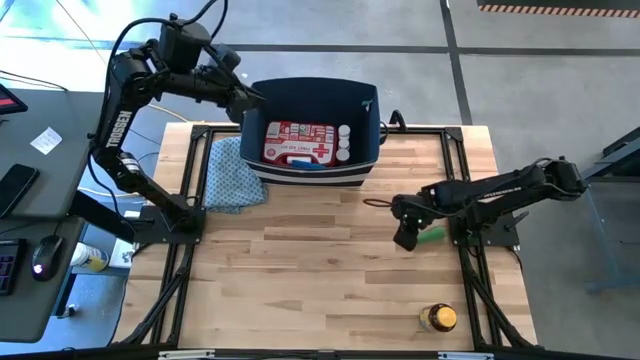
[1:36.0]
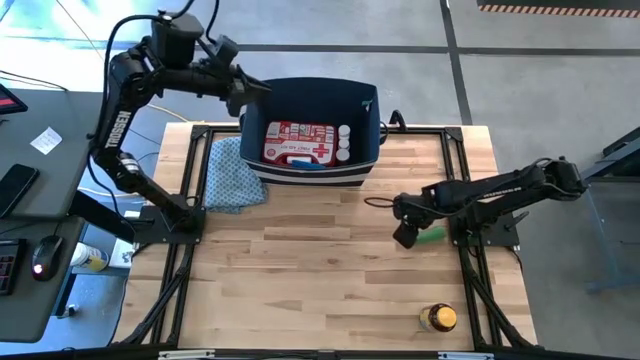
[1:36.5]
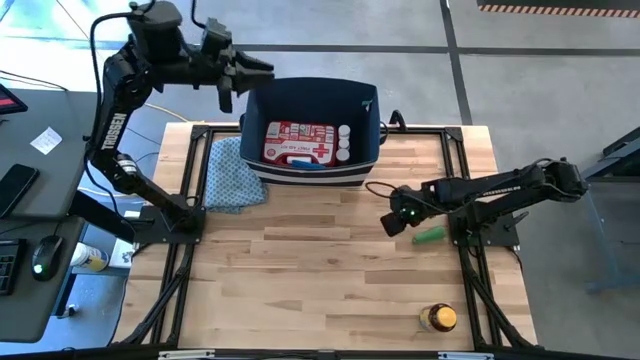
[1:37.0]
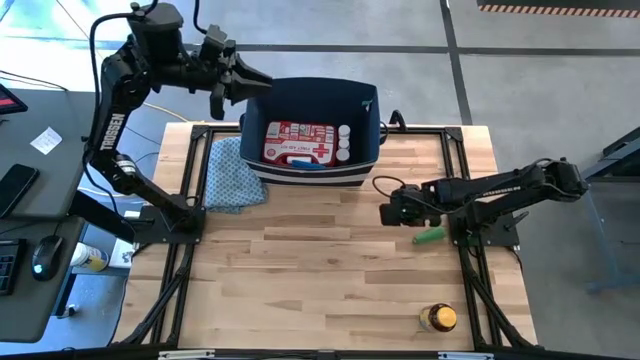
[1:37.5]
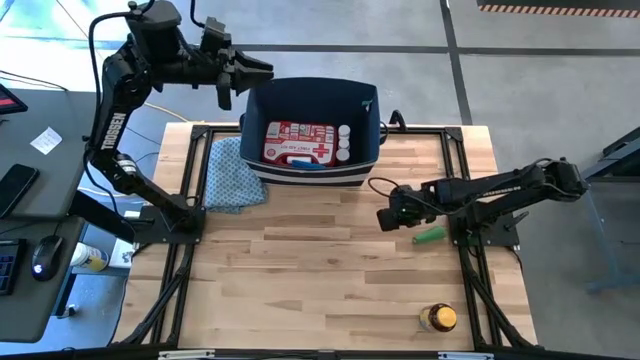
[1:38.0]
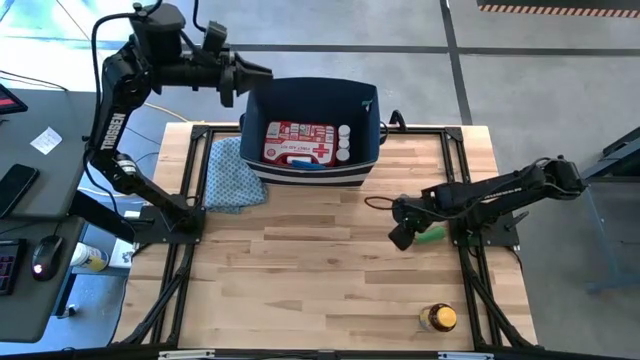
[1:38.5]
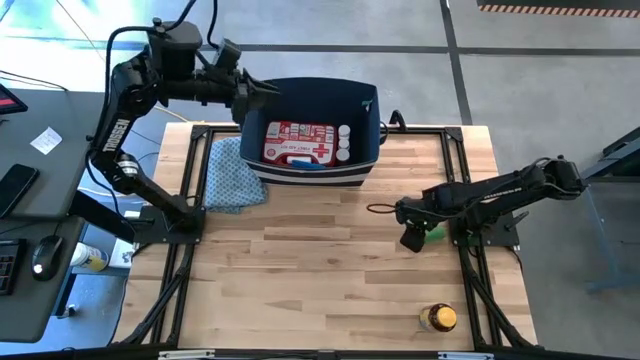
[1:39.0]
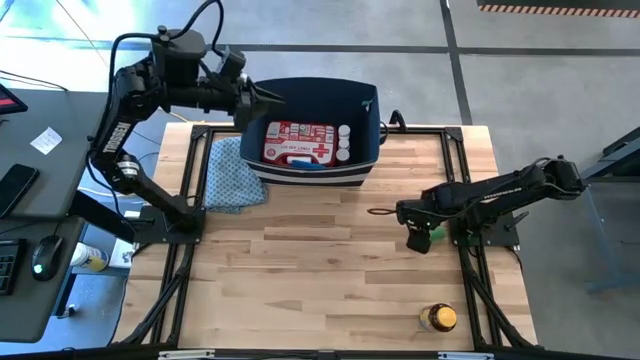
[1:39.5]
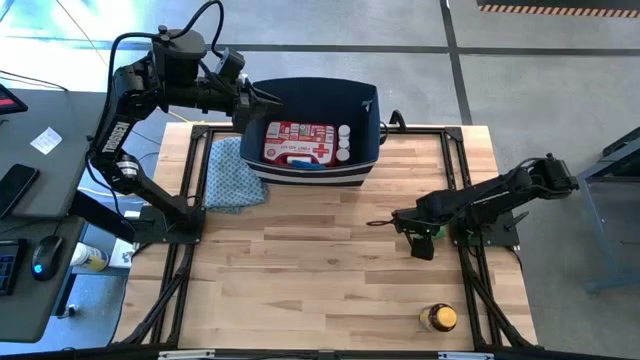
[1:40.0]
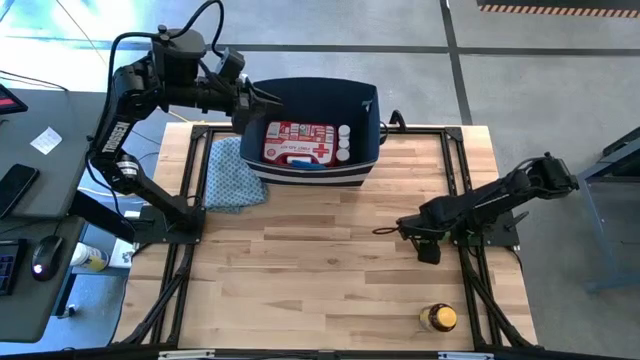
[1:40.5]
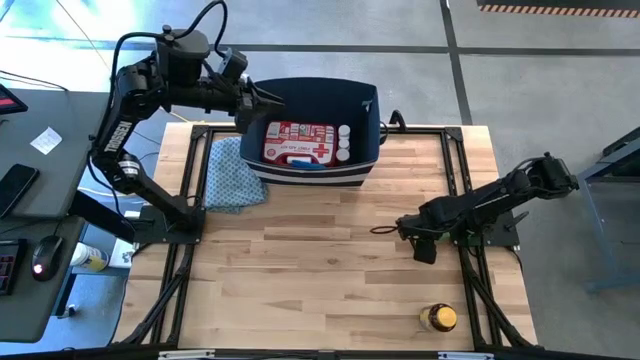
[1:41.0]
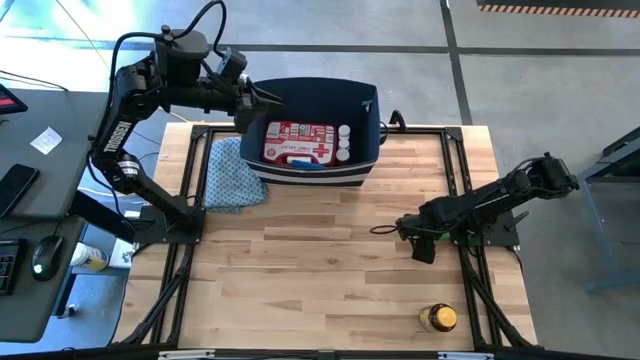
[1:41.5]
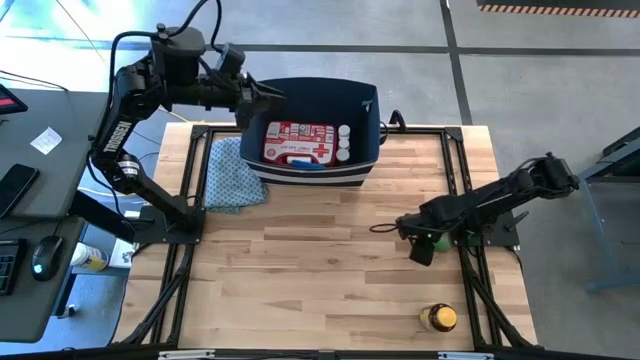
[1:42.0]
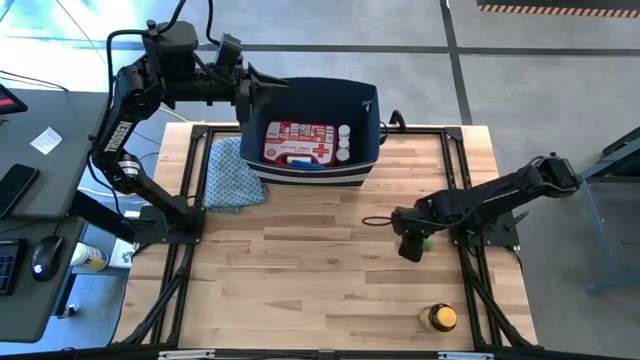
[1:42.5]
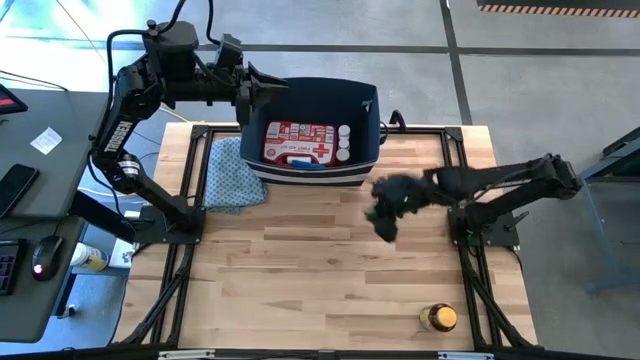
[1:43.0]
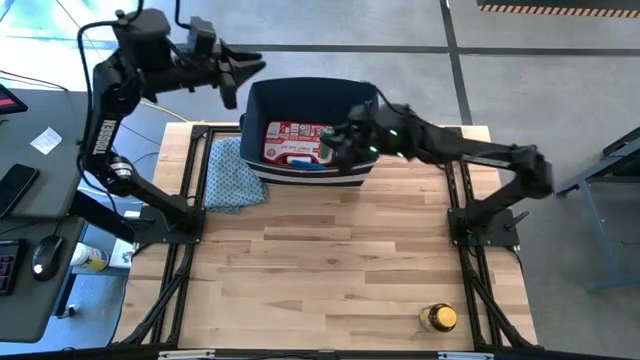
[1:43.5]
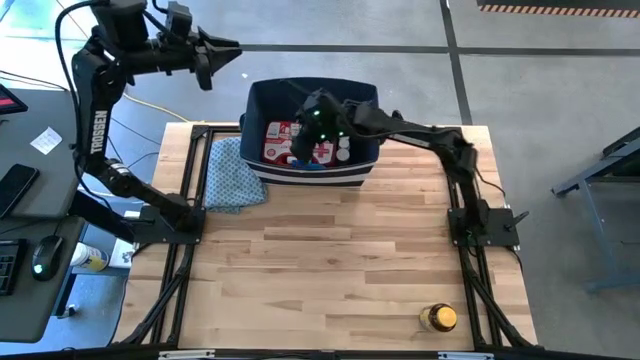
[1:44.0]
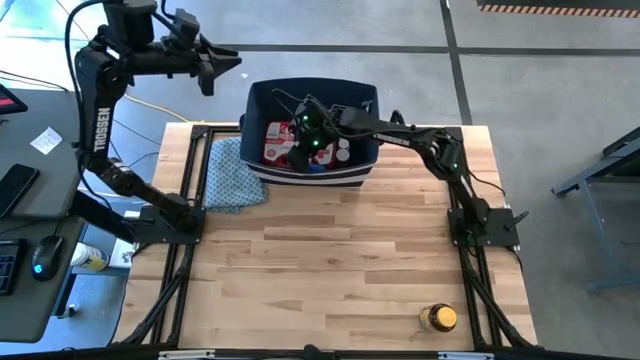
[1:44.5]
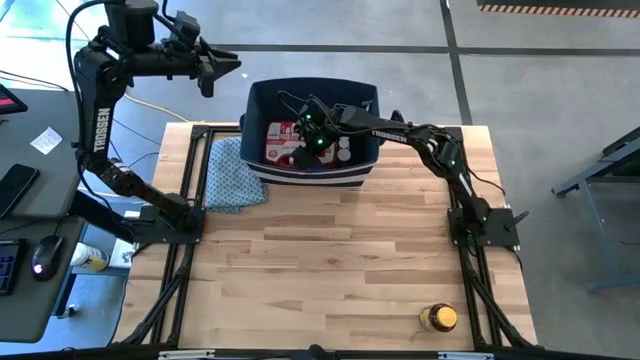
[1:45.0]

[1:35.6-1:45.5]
Task: Pick & place medical supplies in basket/bin
Put the green bandage into the blue bin

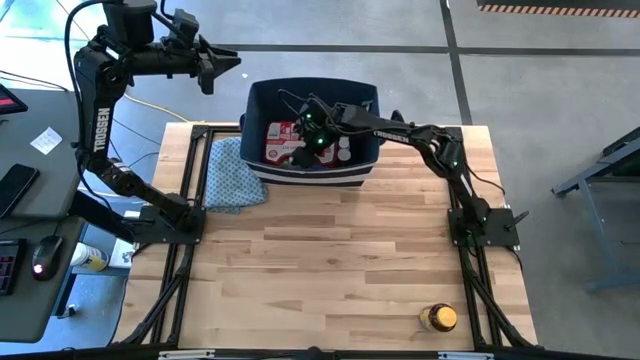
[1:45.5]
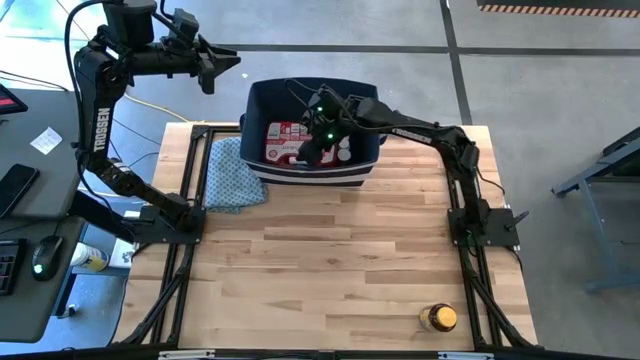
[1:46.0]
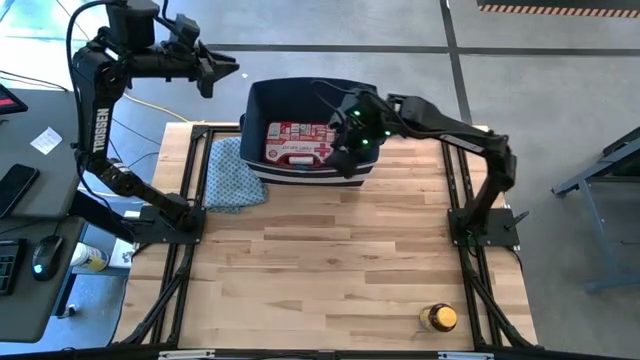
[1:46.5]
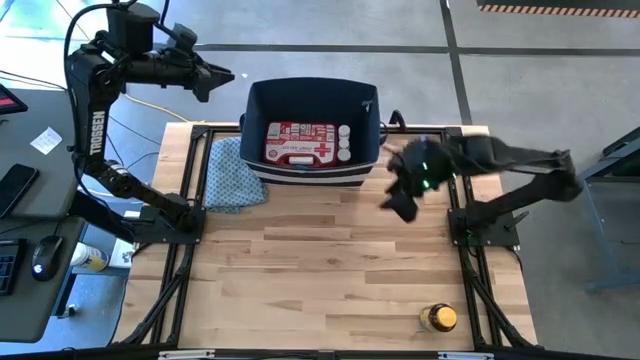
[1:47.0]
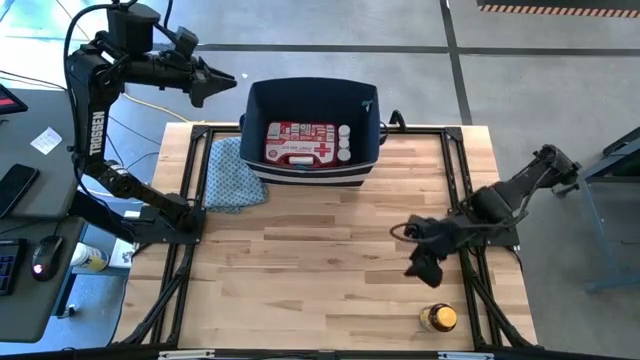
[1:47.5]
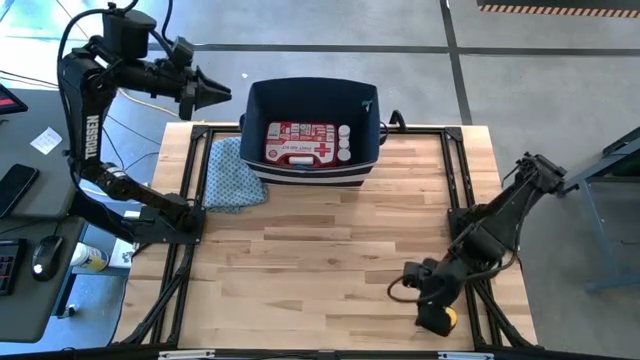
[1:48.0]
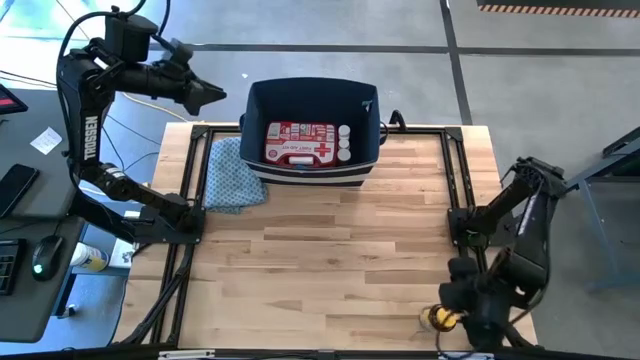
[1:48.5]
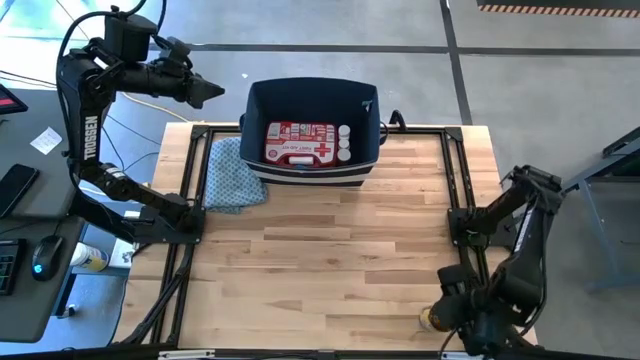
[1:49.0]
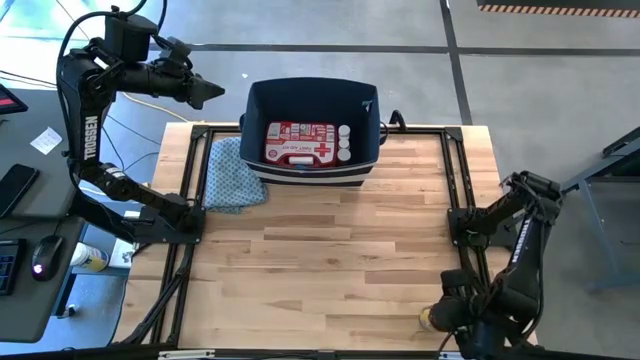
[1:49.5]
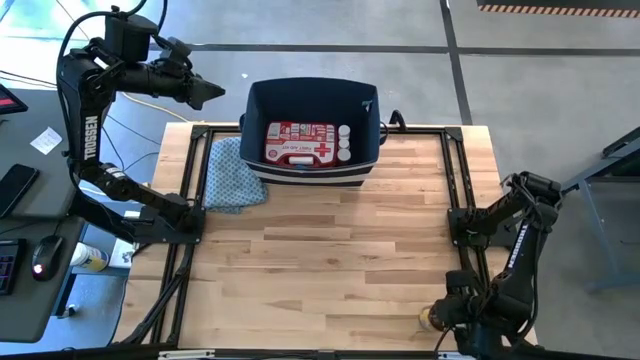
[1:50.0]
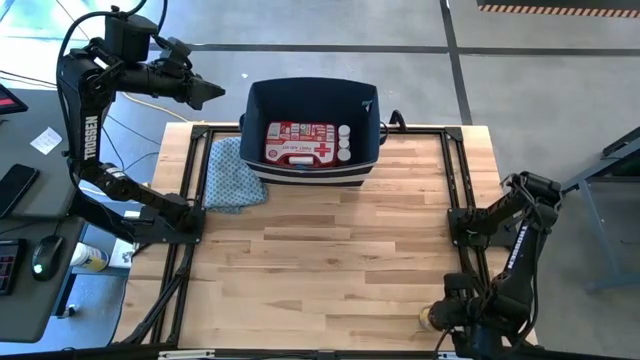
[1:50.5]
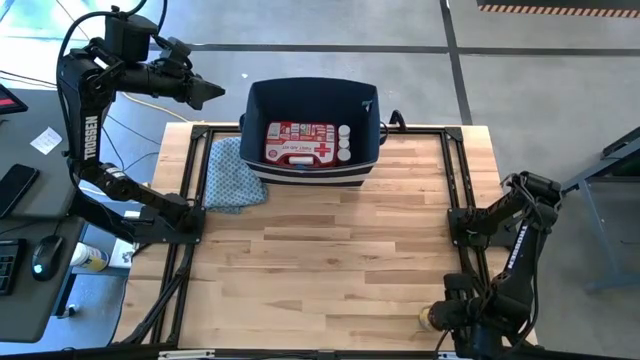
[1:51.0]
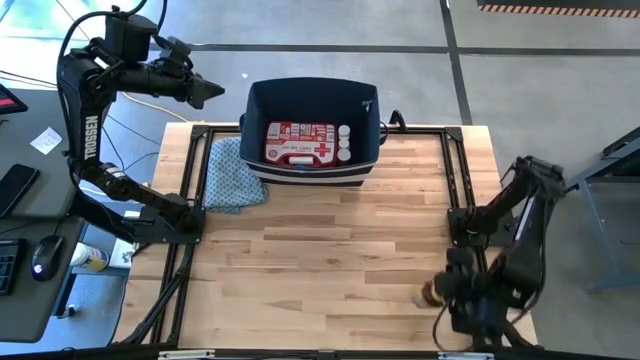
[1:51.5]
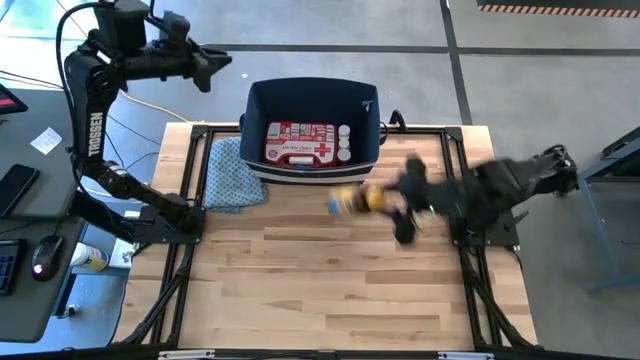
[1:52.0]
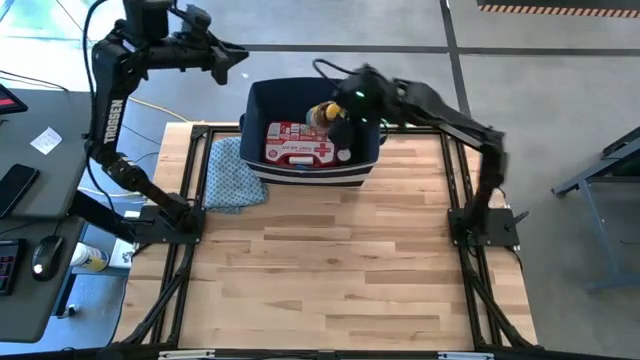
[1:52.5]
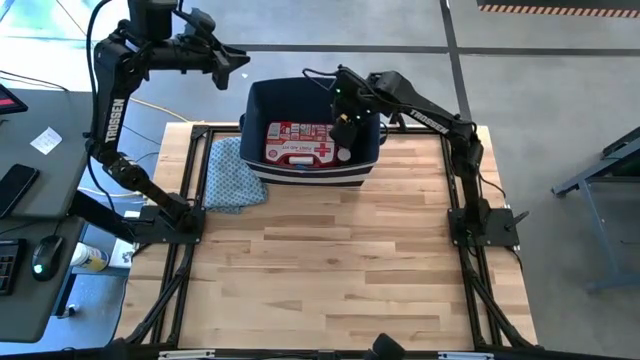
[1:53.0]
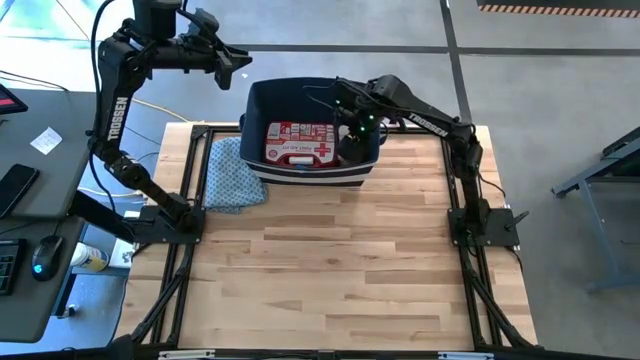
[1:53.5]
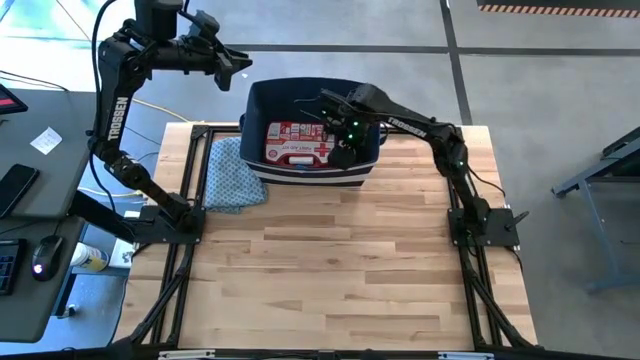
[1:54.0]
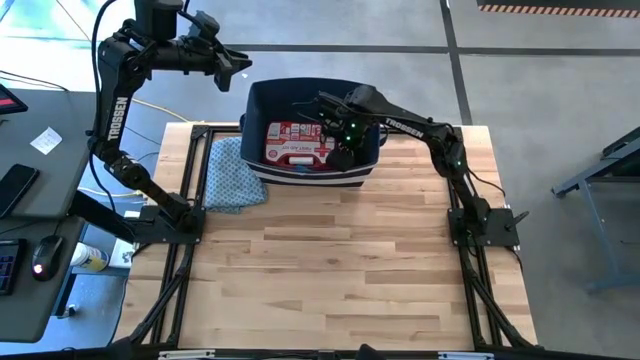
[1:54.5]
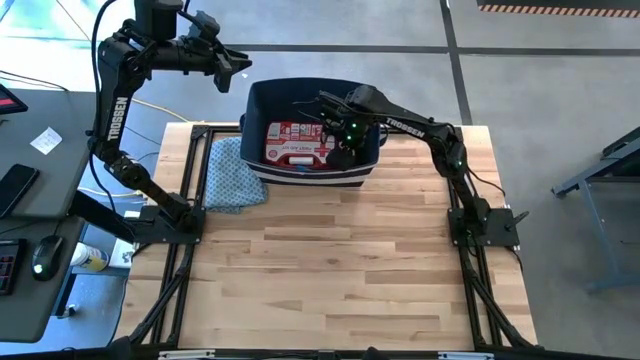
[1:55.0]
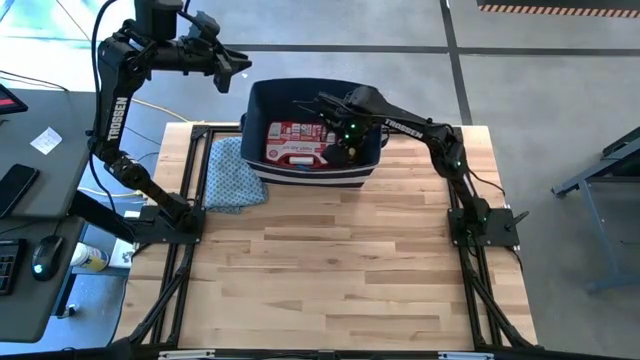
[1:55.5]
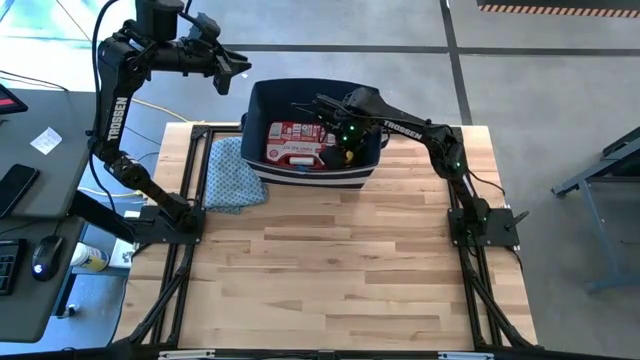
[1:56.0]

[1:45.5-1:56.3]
Put the yellow medicine bottle into the blue bin

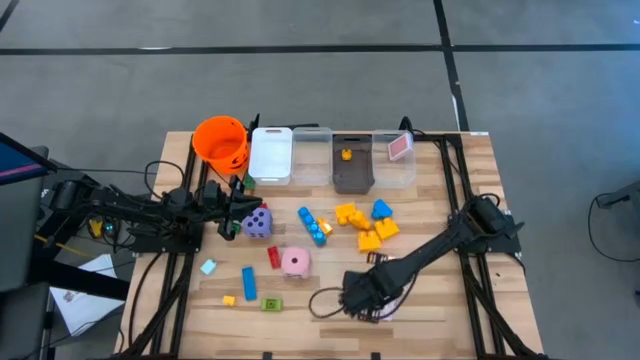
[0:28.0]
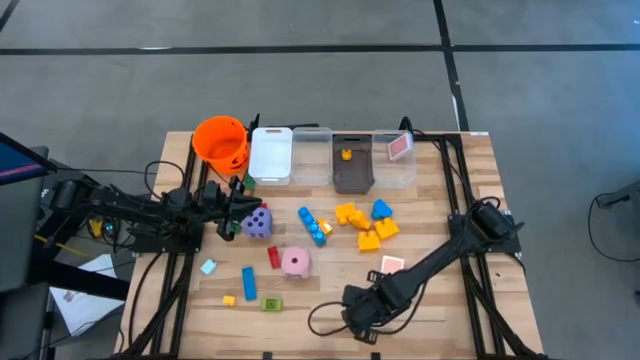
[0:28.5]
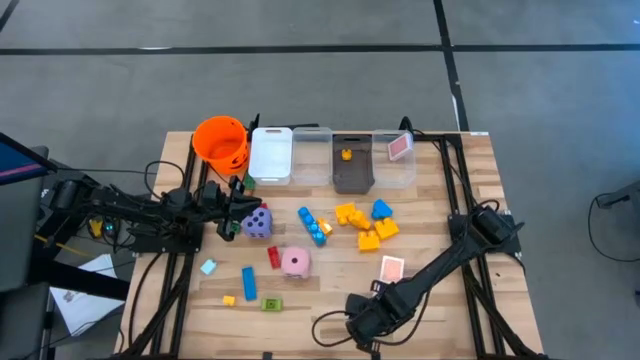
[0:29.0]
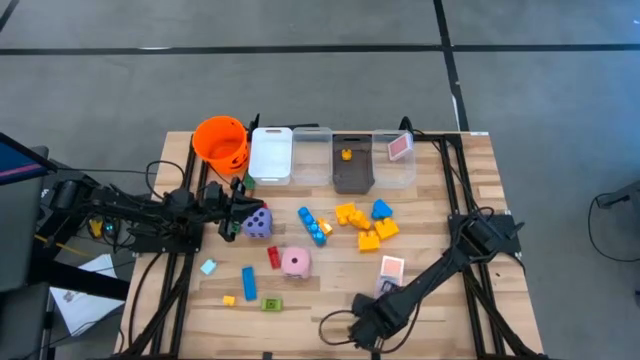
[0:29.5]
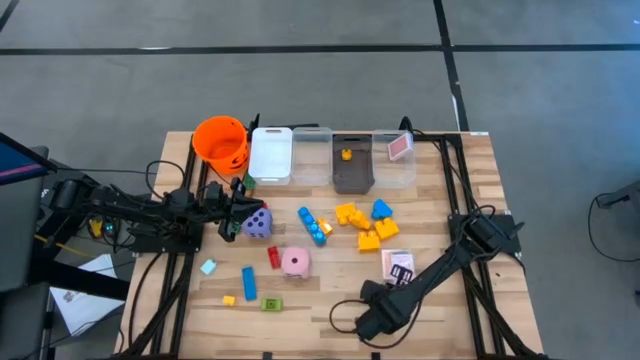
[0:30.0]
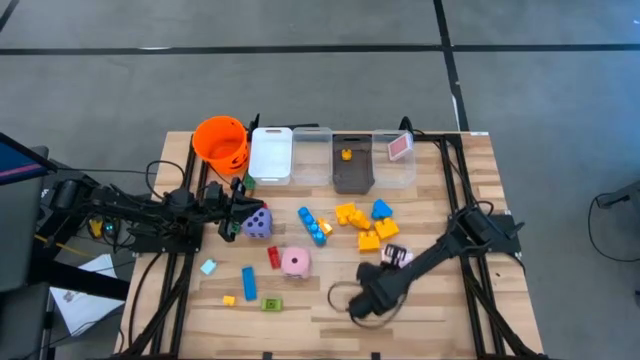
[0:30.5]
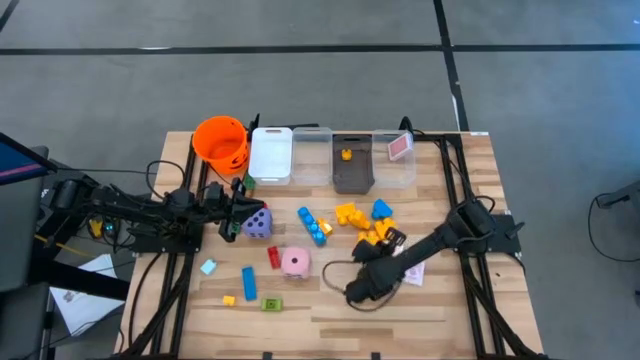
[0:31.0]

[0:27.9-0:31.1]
Task: Pick & Place Toys
Adjust the orange deck of cards on the table
